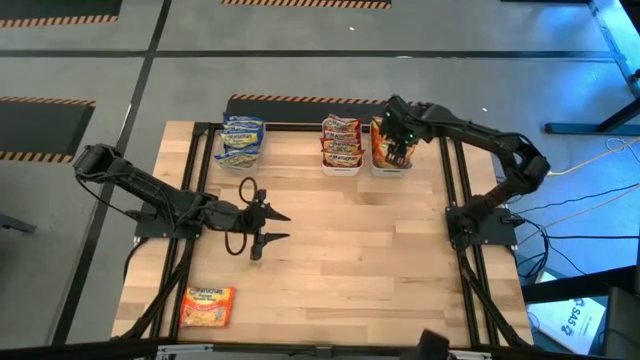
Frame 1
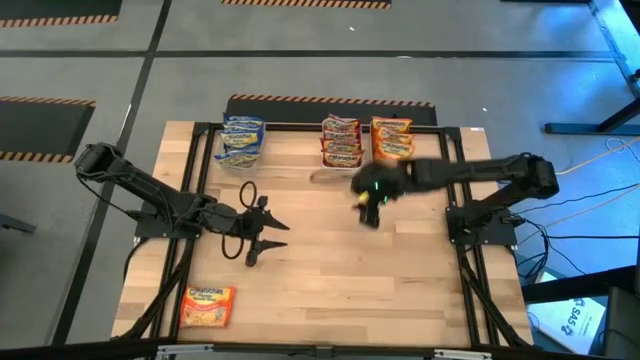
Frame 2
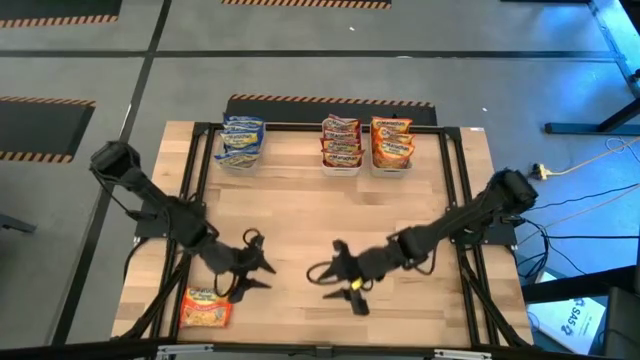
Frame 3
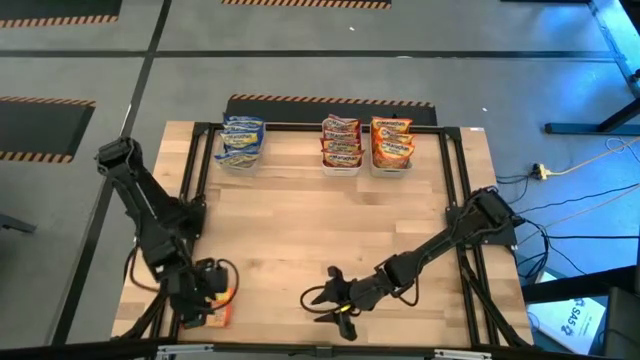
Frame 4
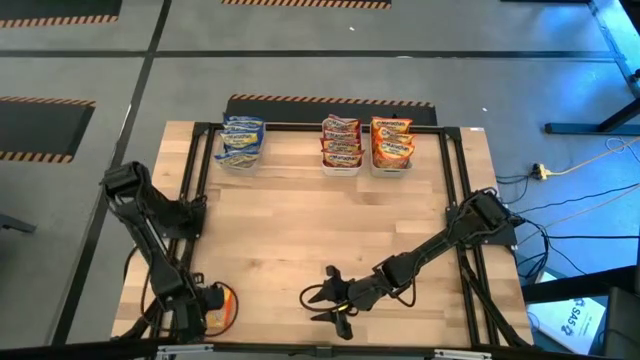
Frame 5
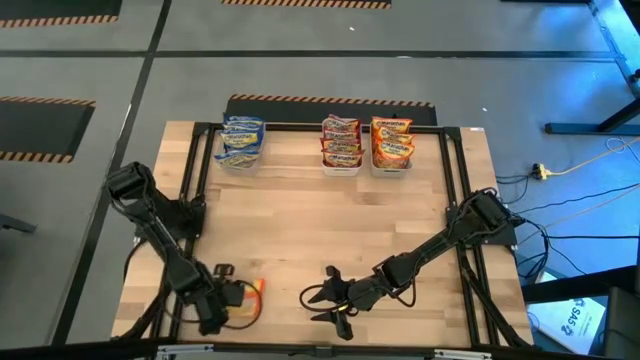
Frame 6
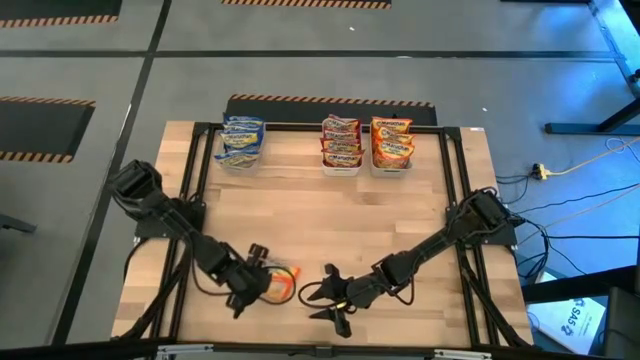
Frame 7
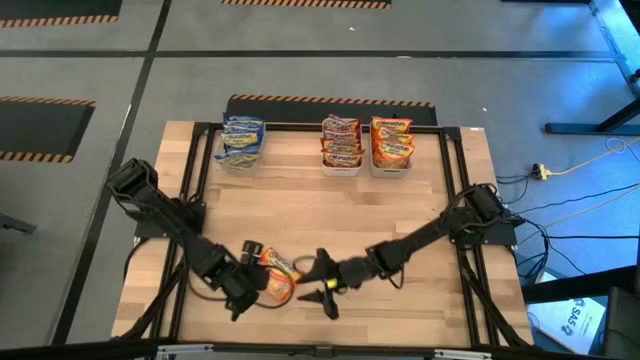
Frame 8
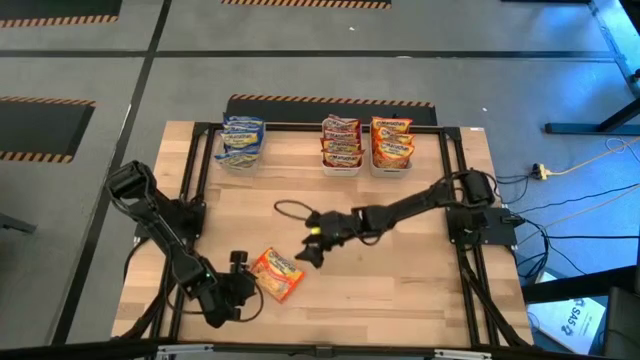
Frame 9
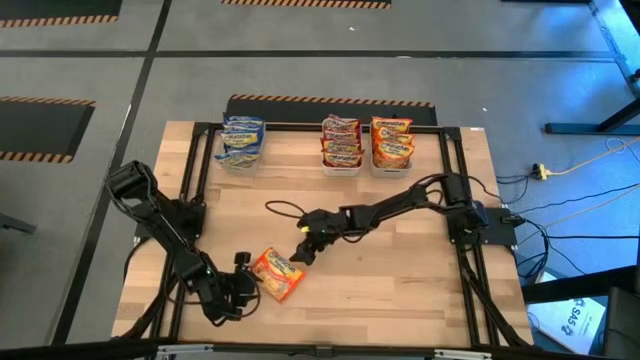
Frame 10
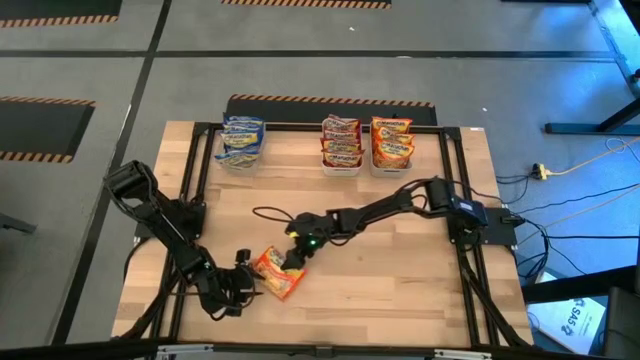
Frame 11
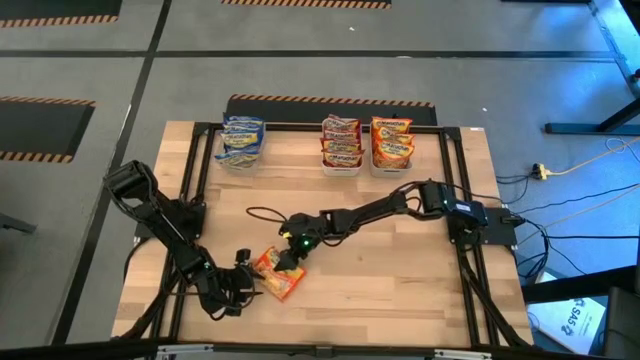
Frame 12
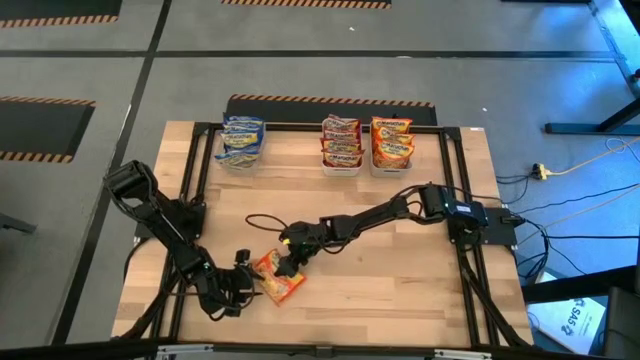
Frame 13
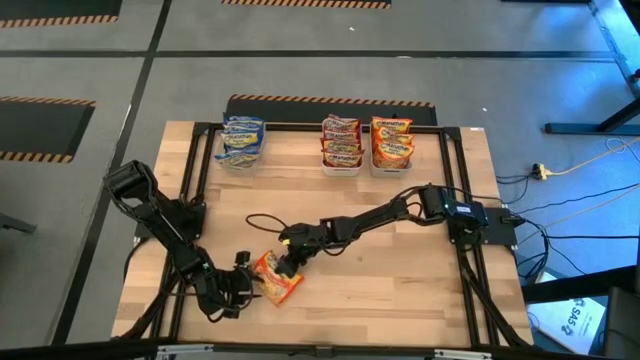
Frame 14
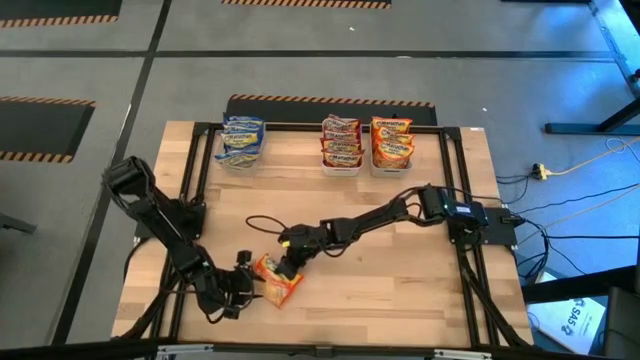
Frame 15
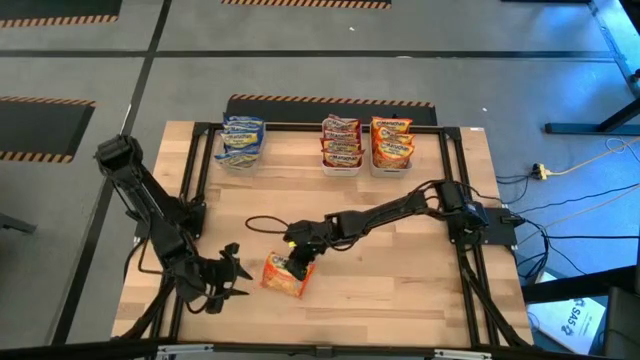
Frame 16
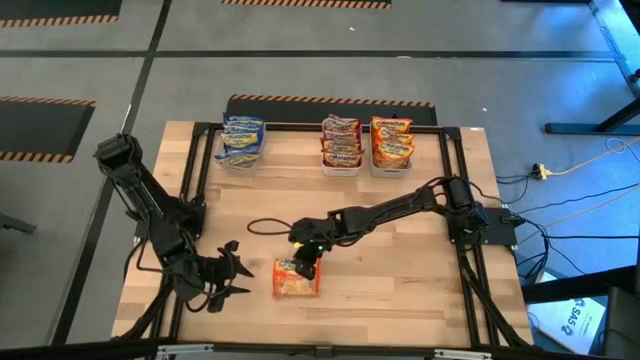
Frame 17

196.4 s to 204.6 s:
Task: Sort Maruchan noodles
Put the orange noodle pack into the gray bin

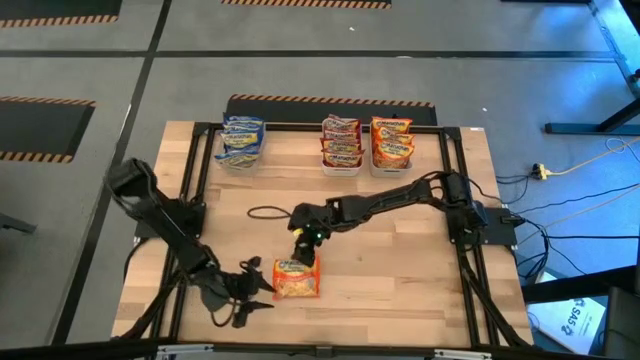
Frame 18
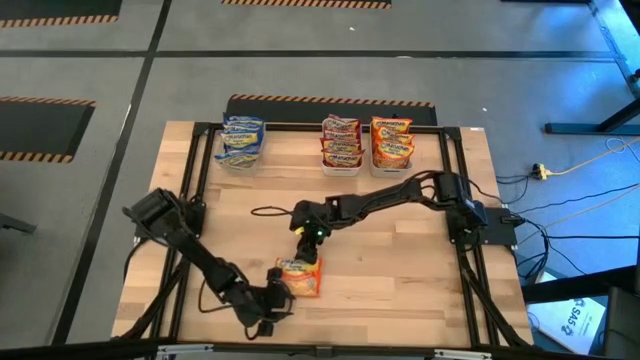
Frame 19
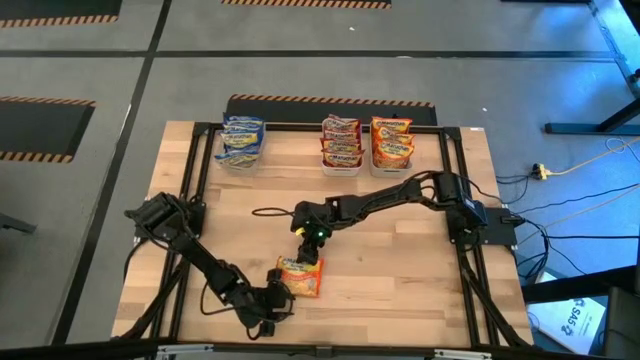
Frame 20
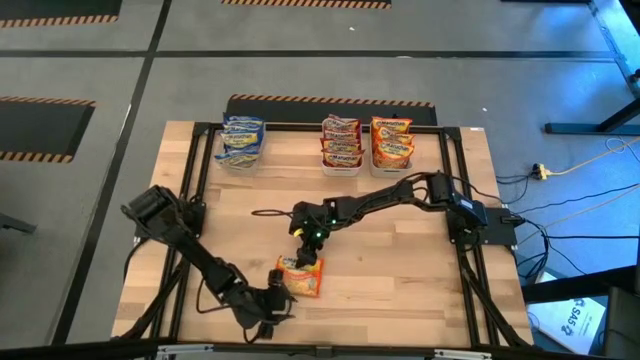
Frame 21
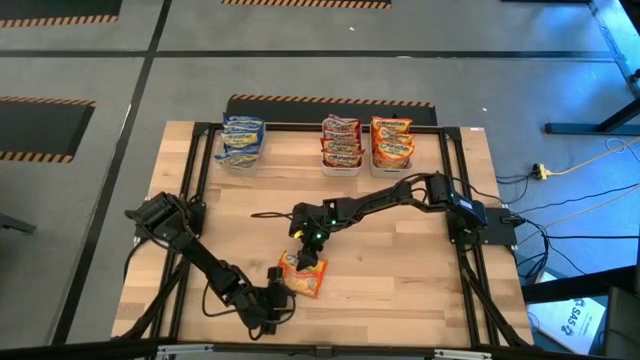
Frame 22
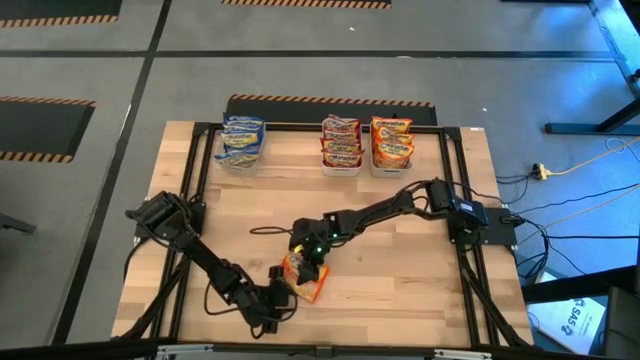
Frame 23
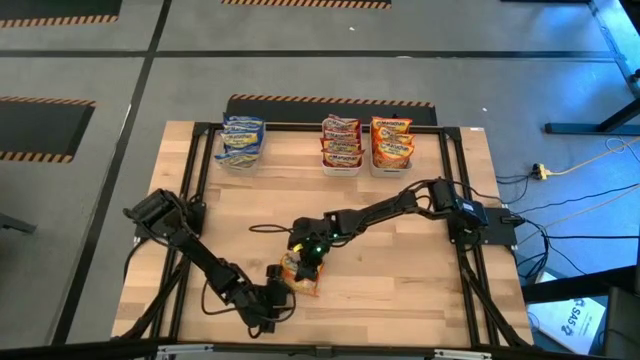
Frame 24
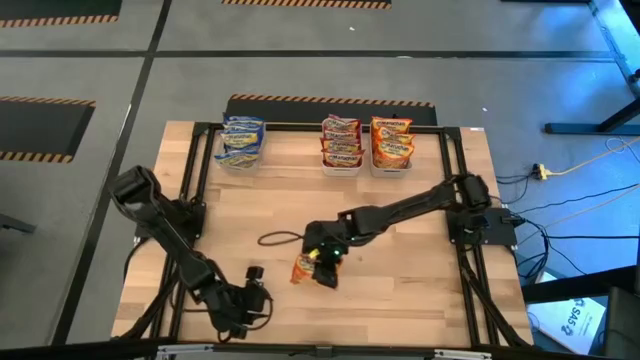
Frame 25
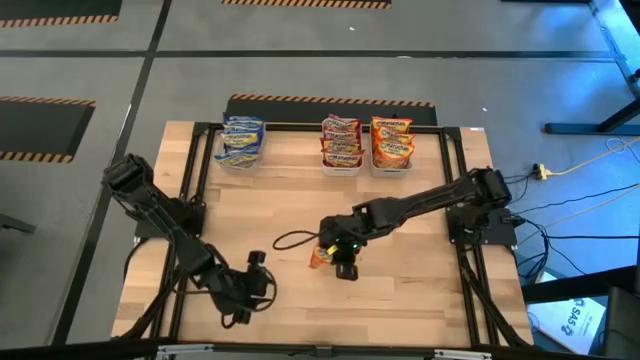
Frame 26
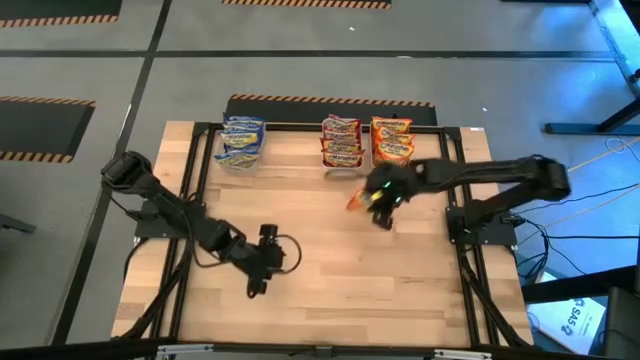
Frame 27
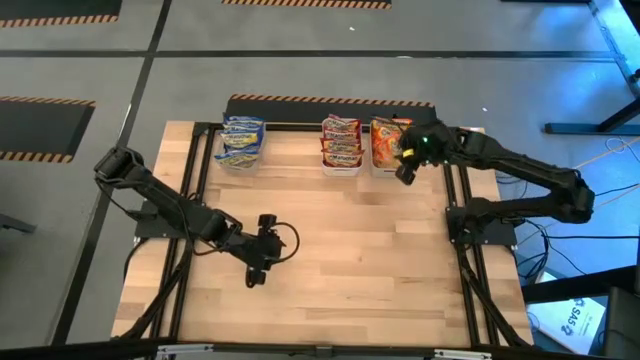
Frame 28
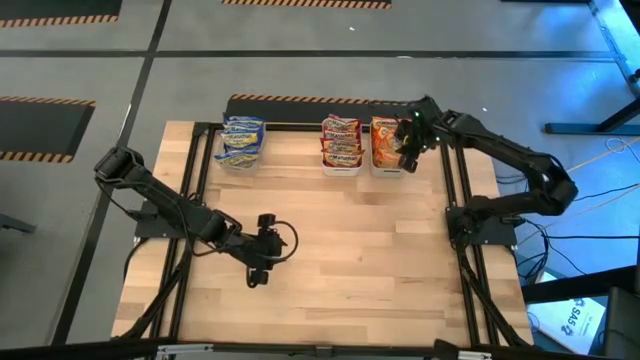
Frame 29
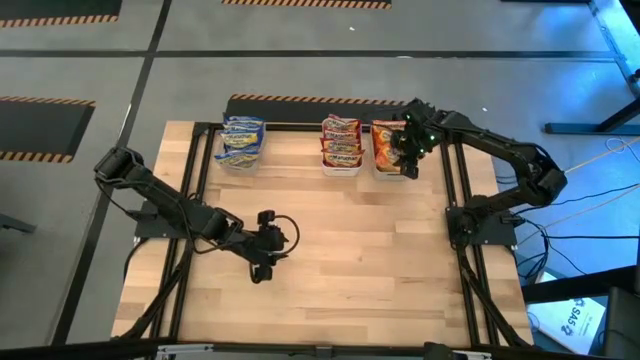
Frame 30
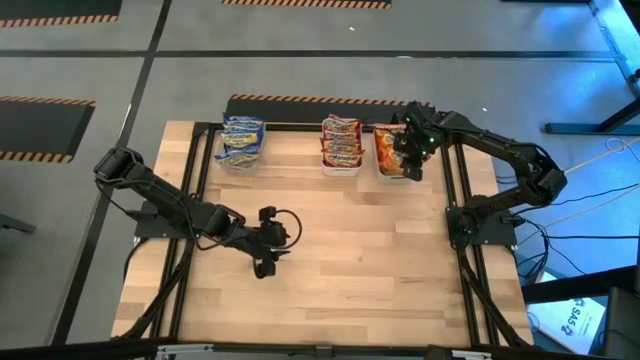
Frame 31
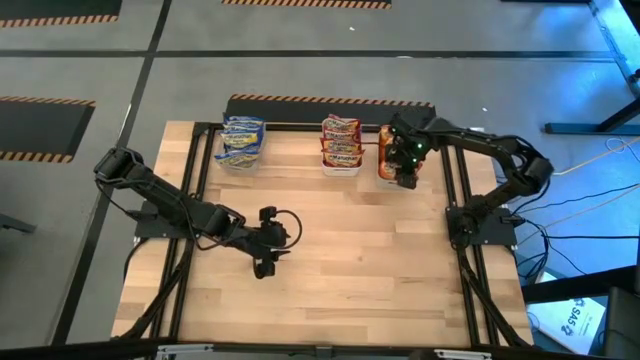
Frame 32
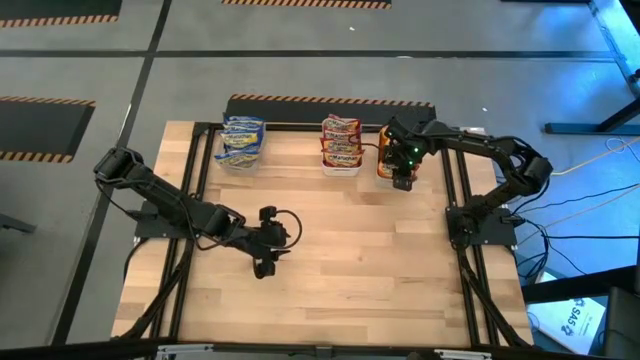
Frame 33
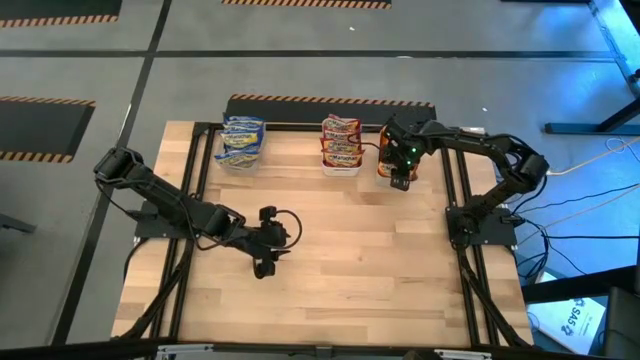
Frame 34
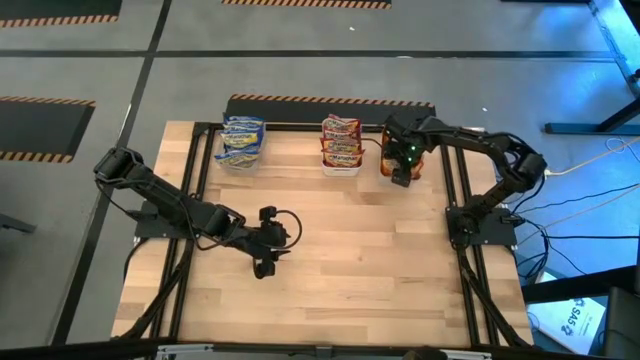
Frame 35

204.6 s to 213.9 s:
Put the orange noodle pack into the gray bin

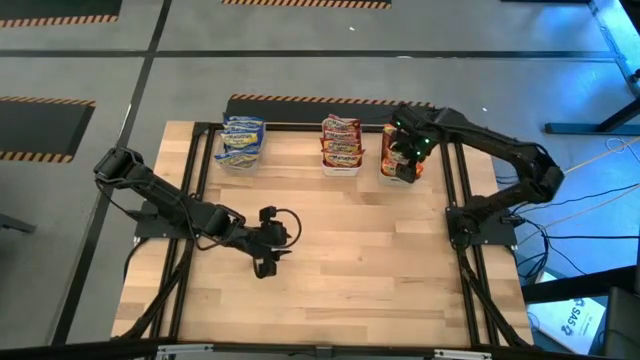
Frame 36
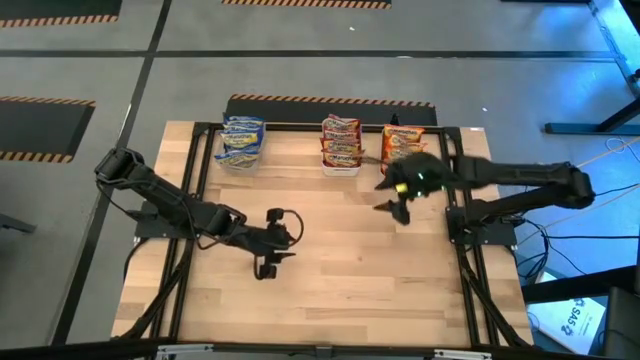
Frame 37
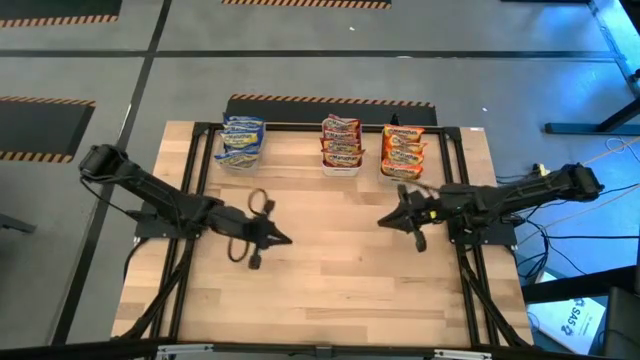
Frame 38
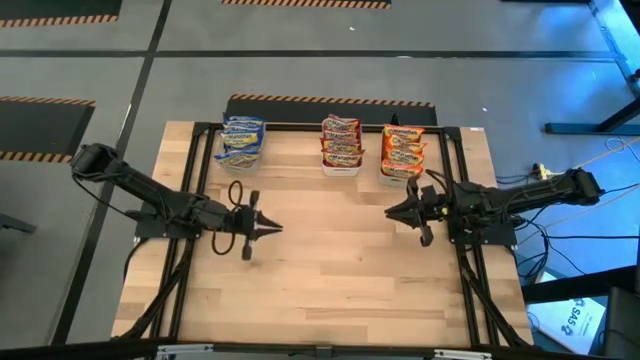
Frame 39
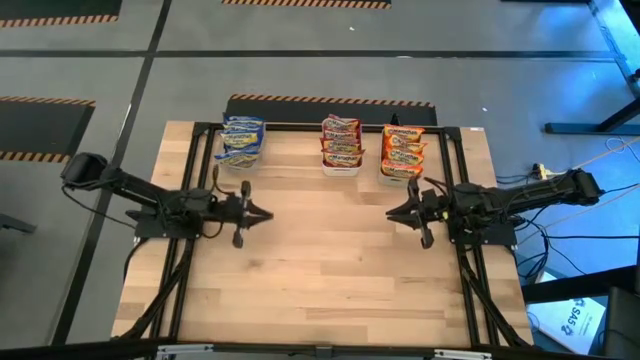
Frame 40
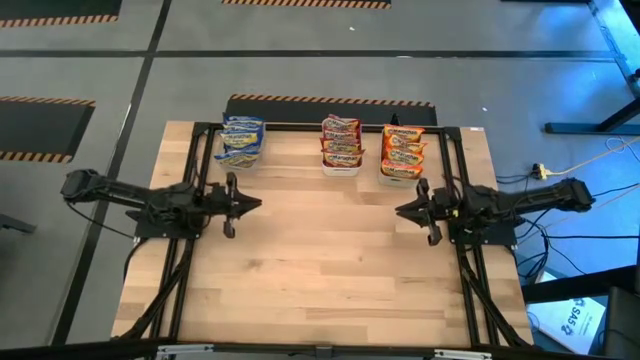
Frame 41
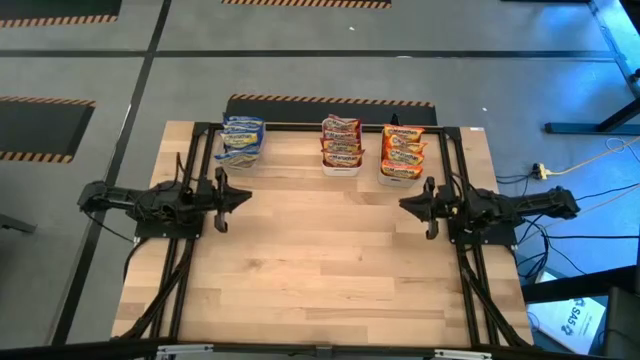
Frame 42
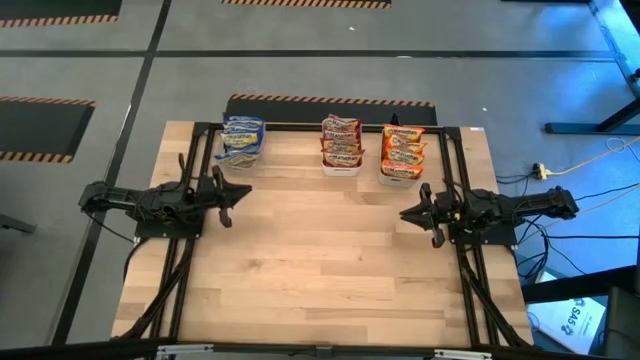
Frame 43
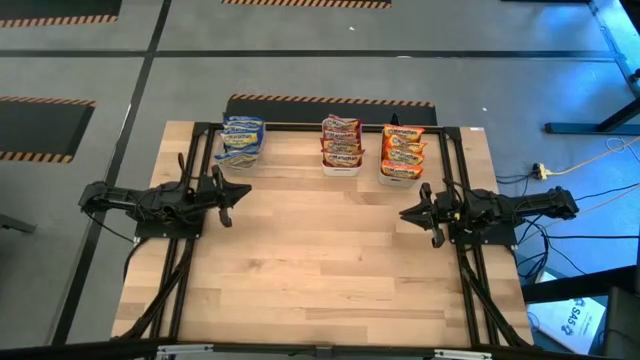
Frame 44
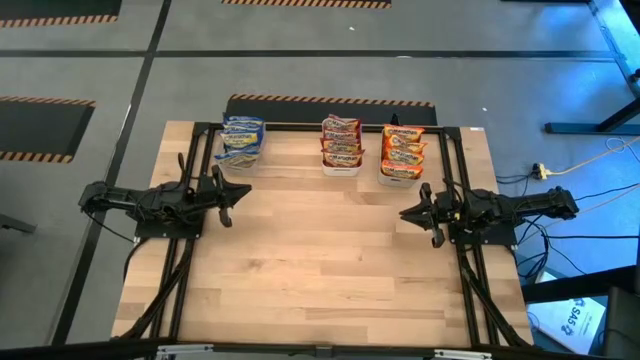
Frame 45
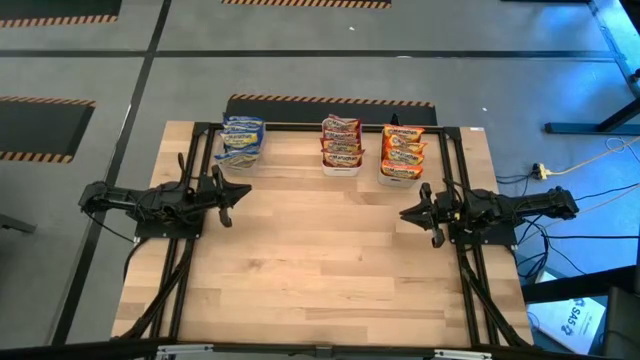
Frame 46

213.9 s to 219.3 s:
Return to Home Position
